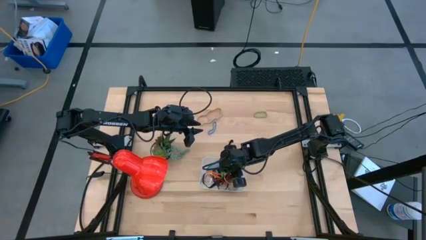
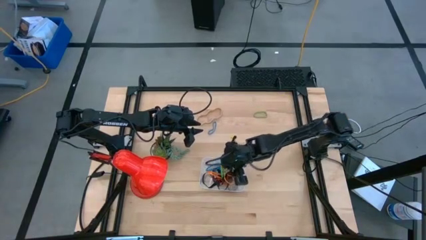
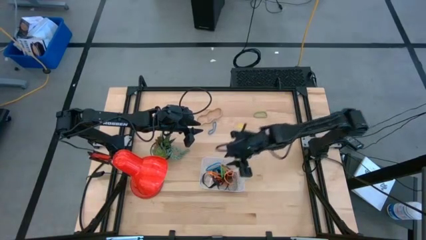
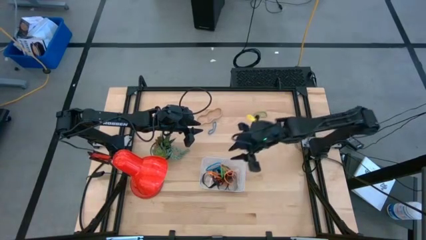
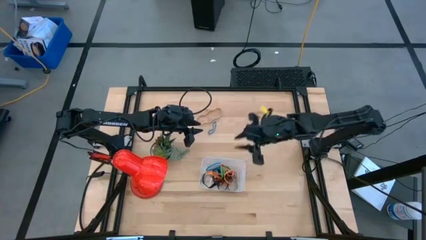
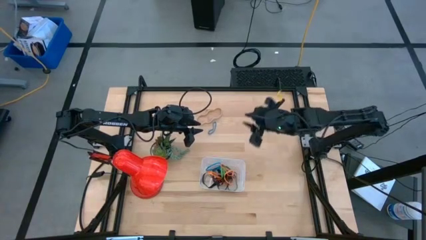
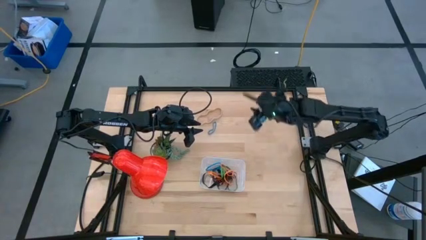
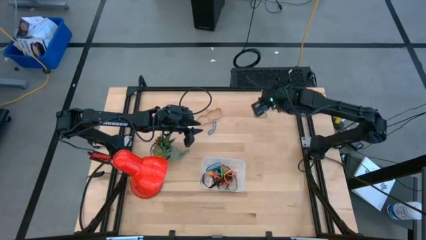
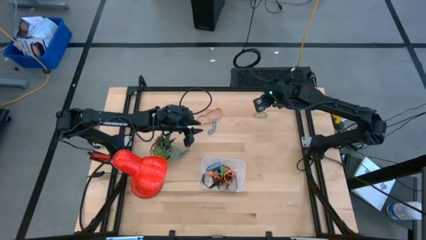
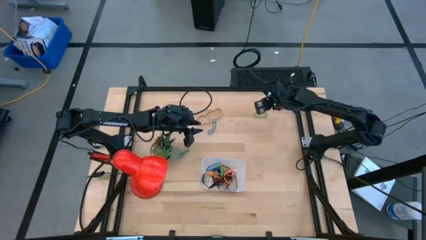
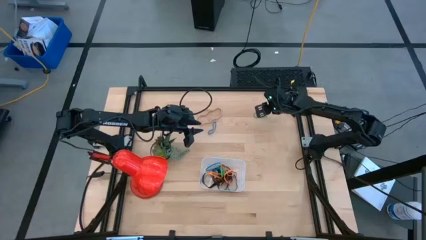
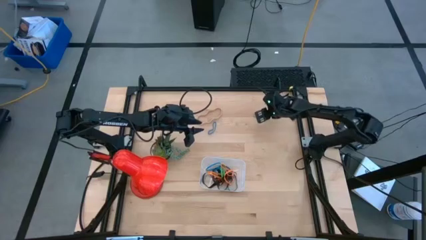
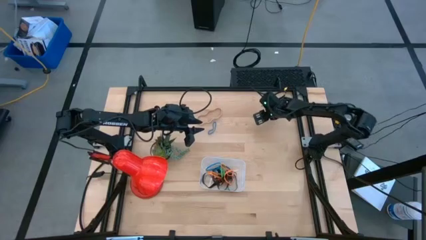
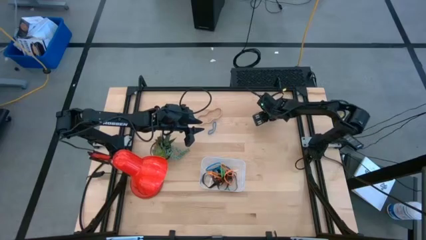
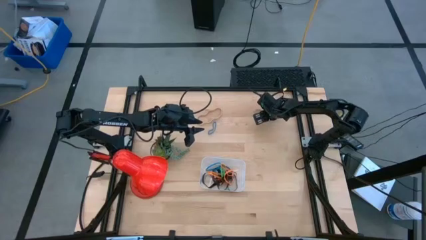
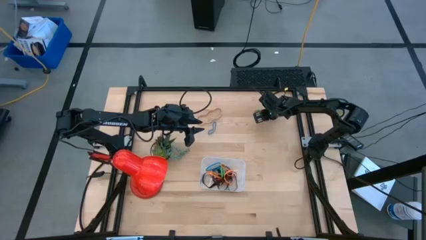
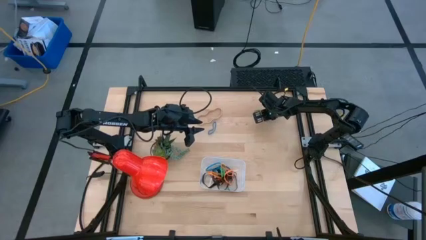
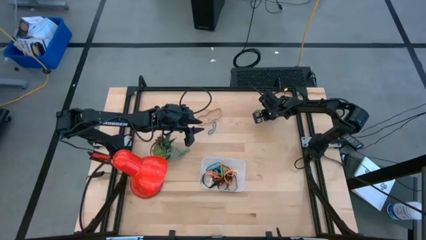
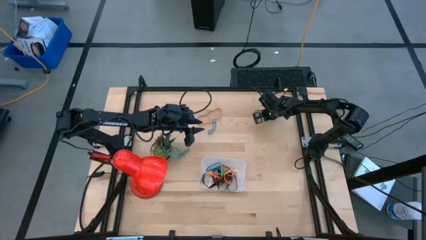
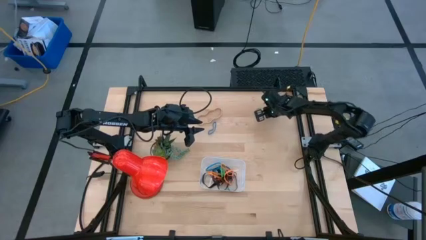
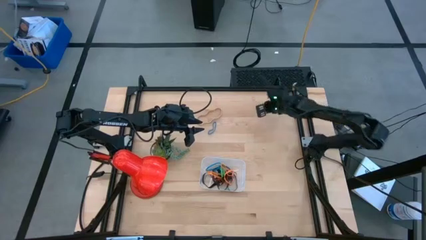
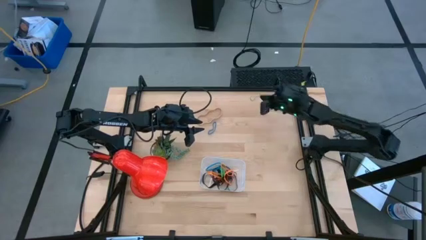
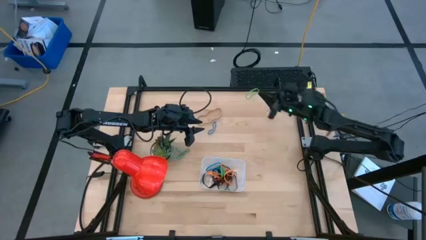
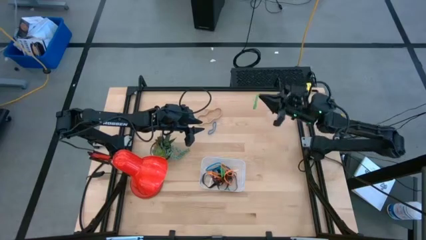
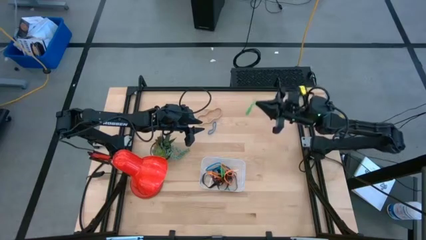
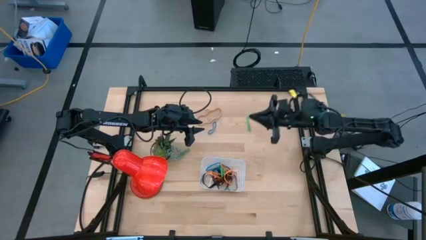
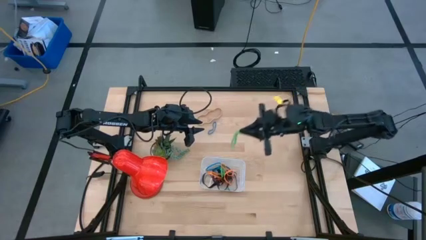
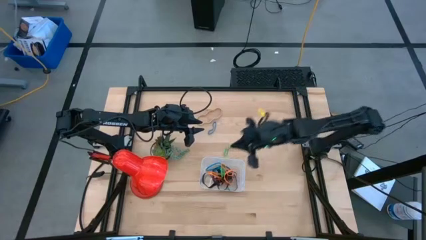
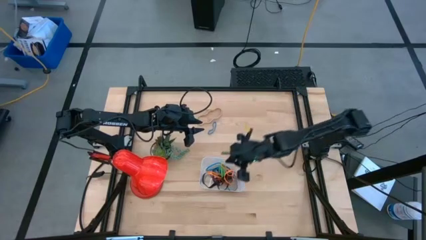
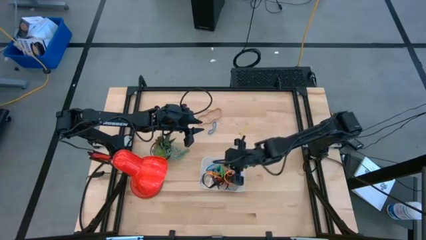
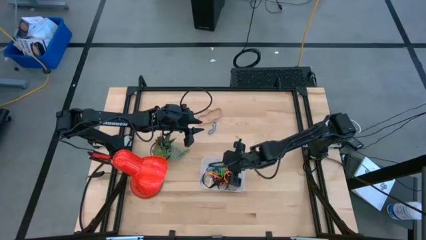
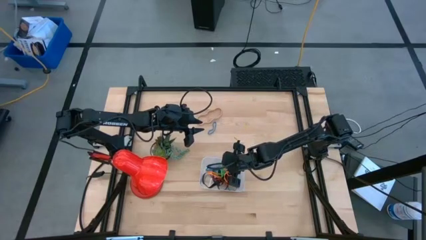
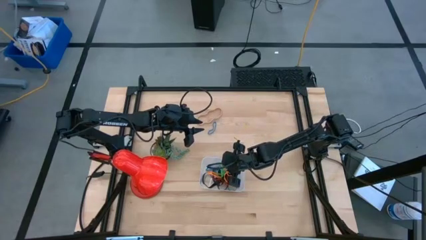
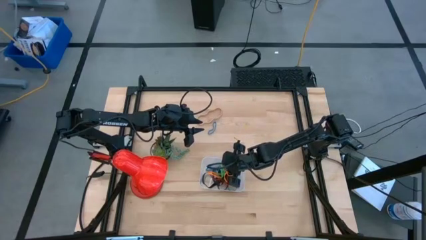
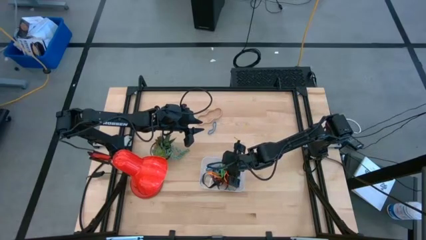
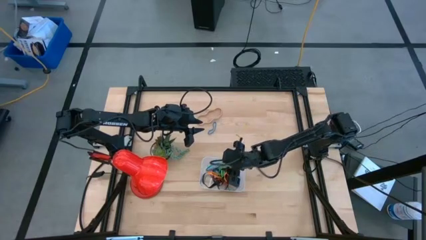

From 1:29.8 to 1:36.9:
Task: Pick and place rubber bands into bin
Put the green rubber band into the bin

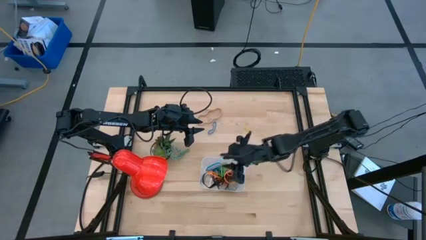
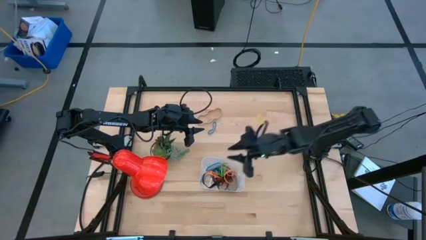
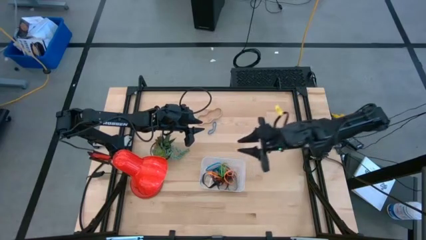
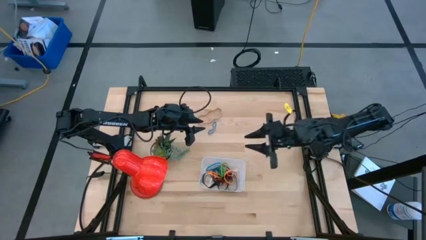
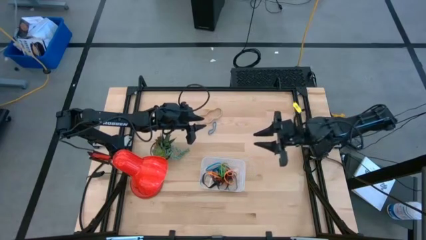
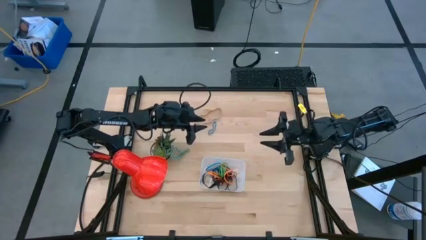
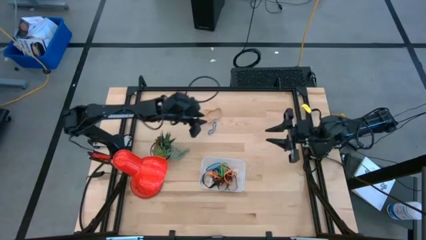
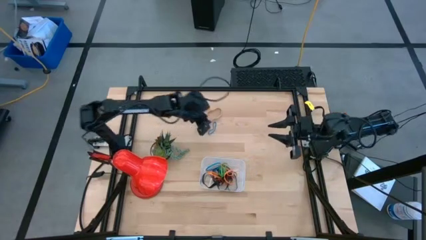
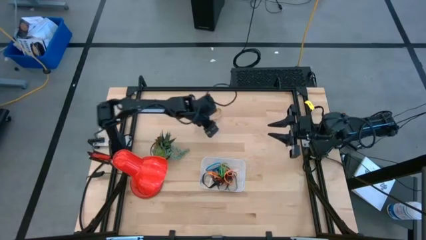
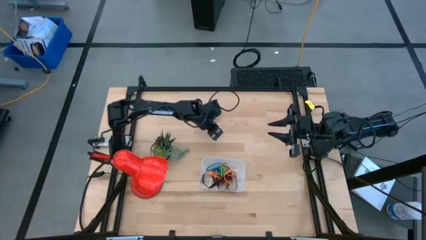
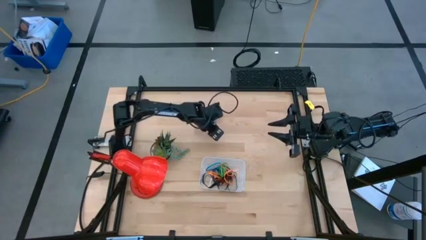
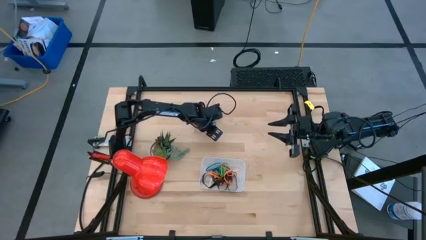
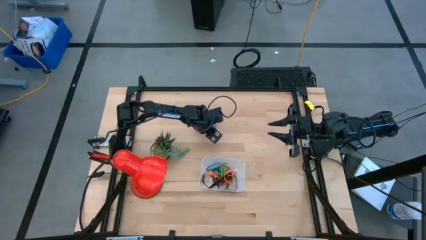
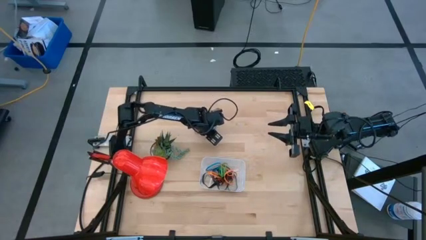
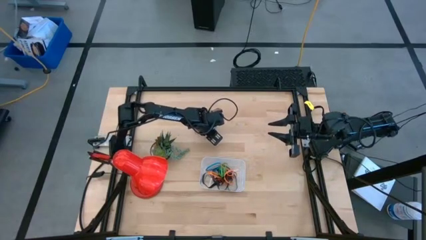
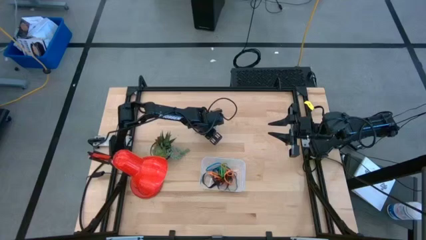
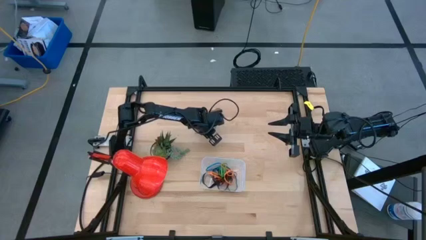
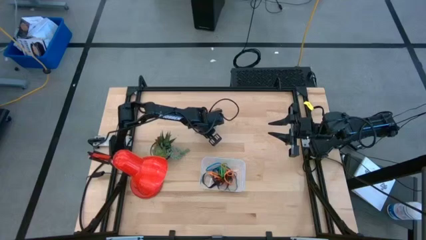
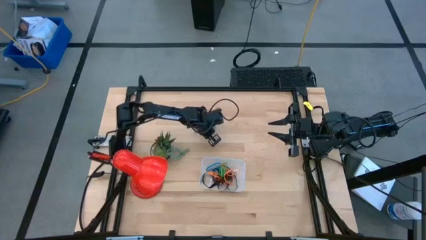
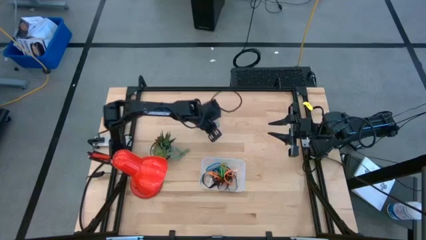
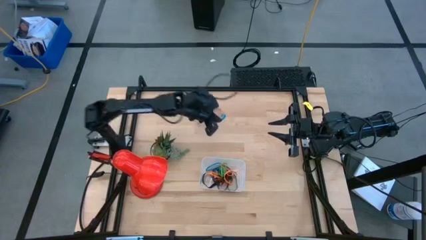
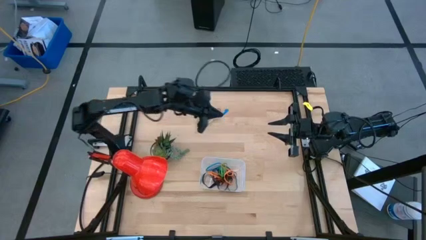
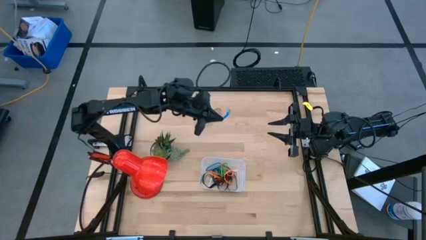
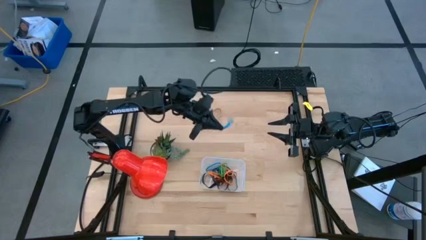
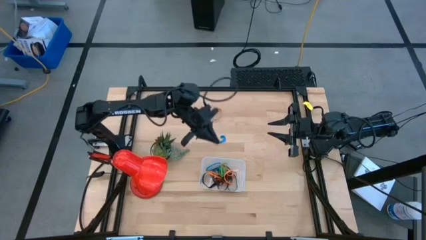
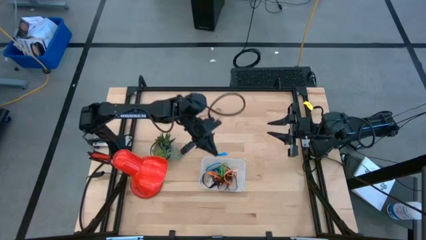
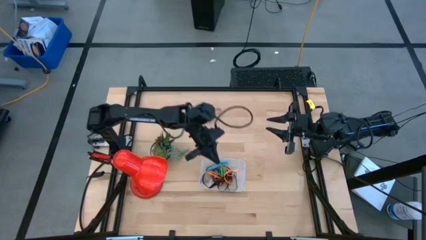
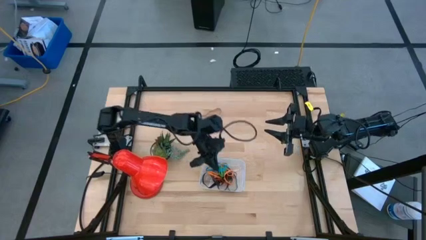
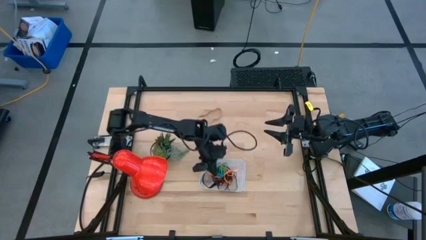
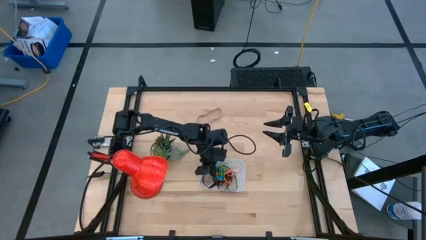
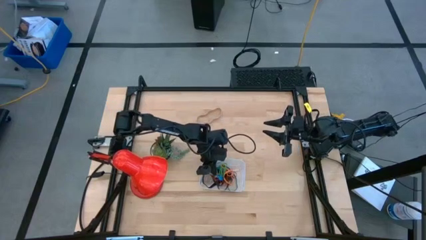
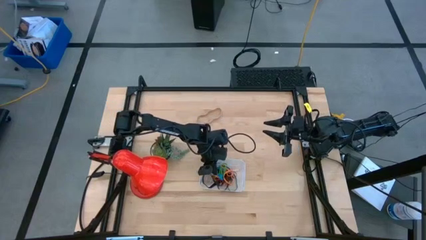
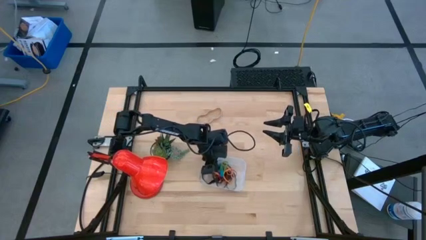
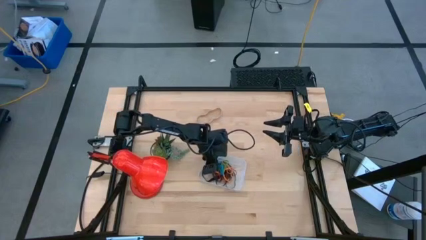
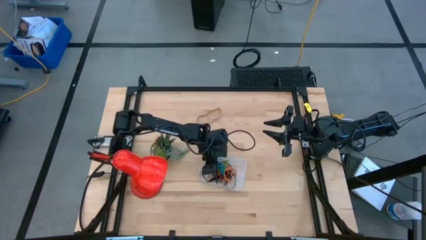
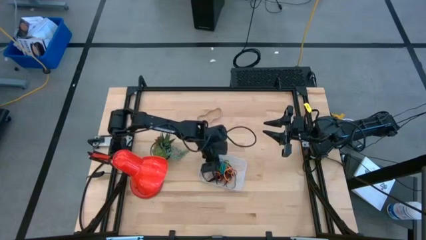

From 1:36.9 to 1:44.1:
Put the blue rubber band into the bin
